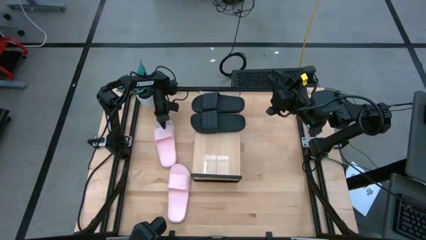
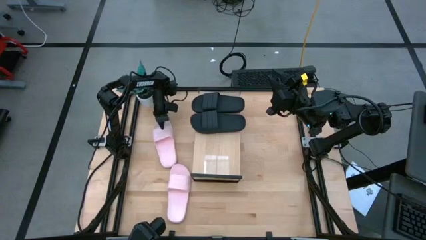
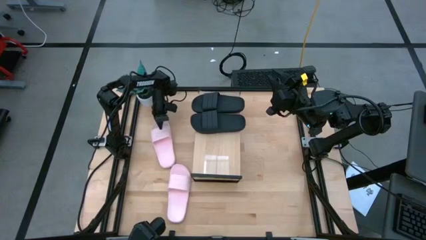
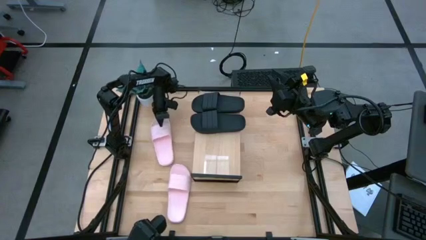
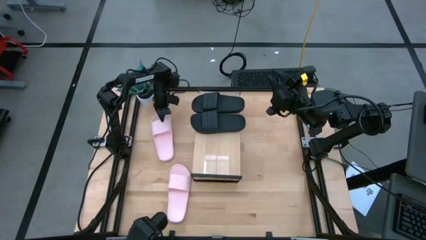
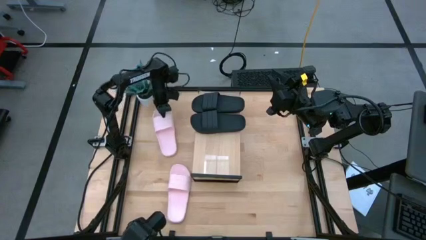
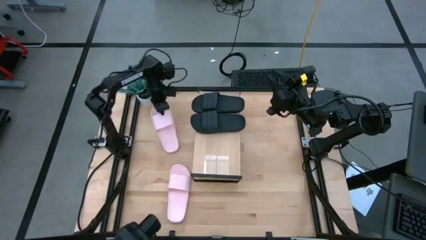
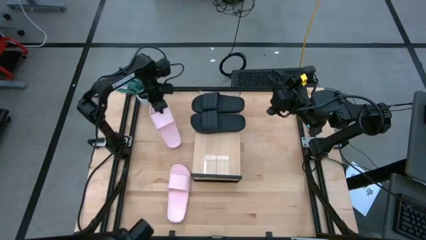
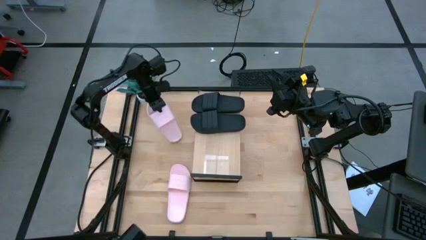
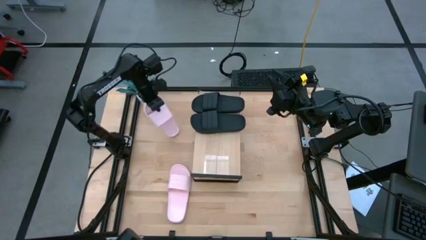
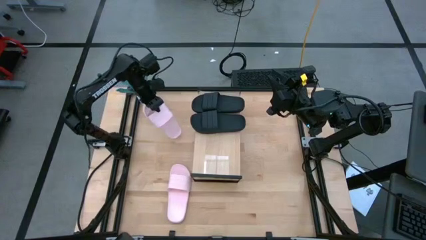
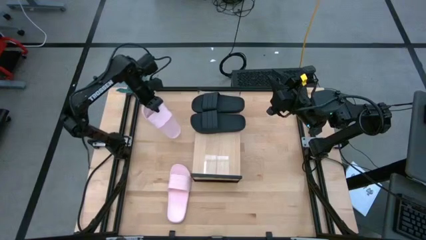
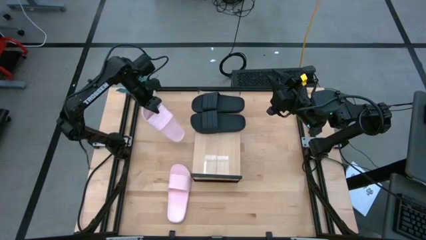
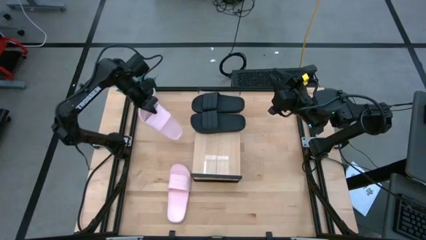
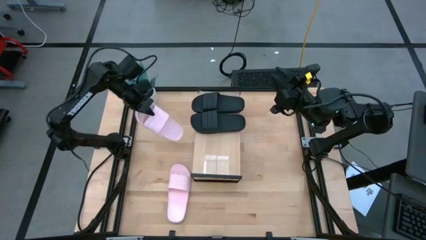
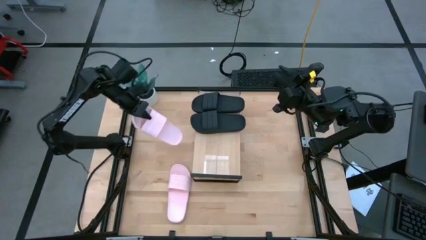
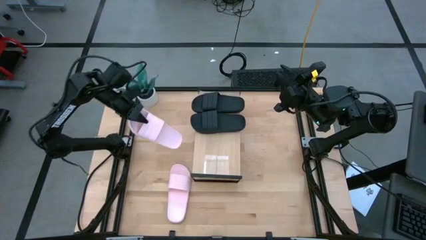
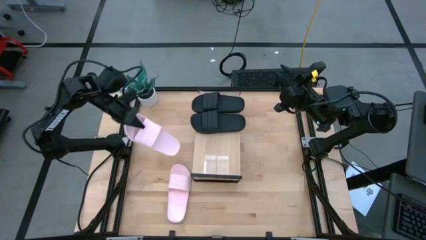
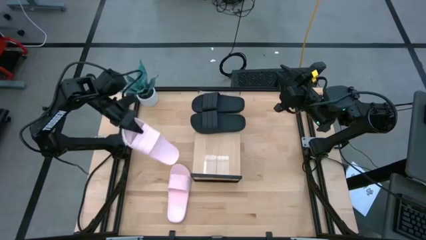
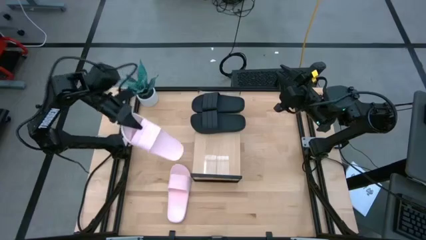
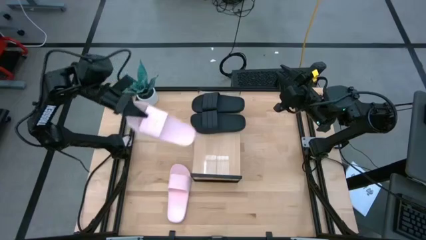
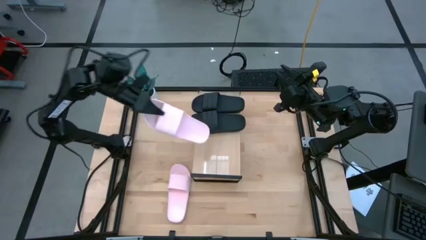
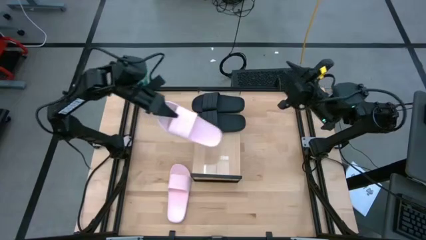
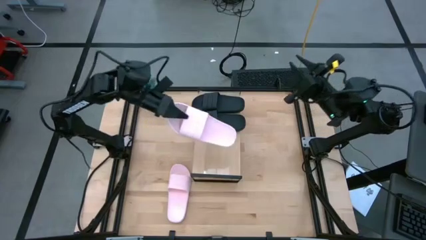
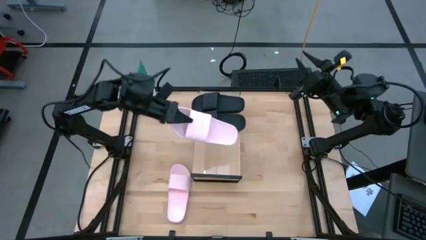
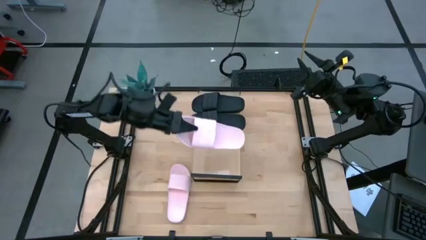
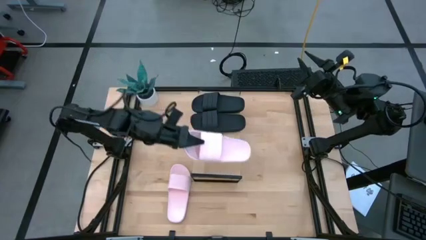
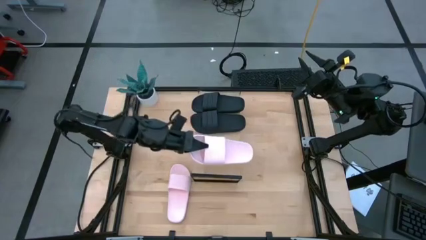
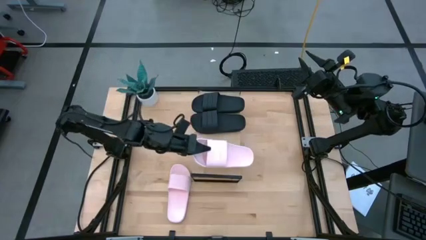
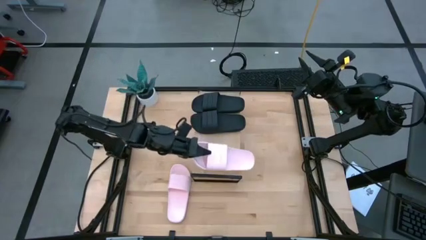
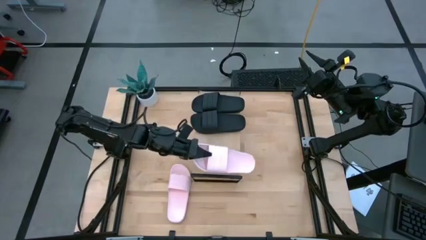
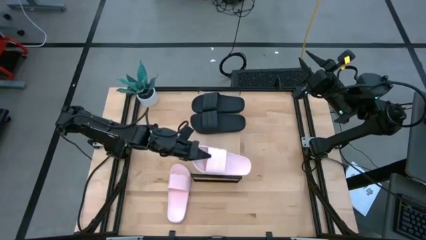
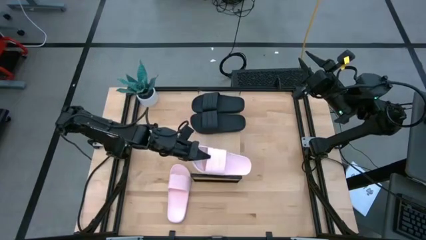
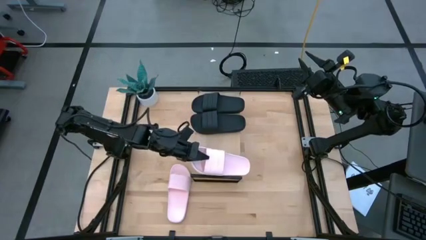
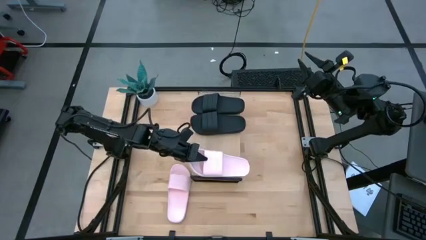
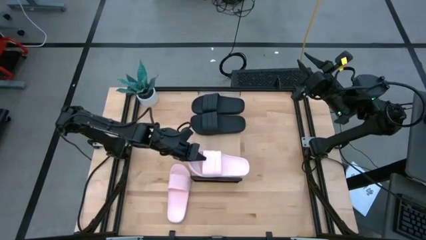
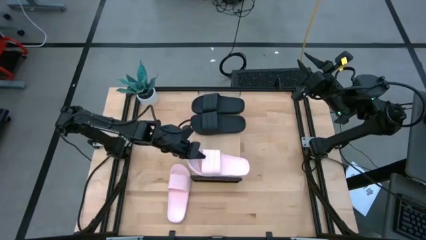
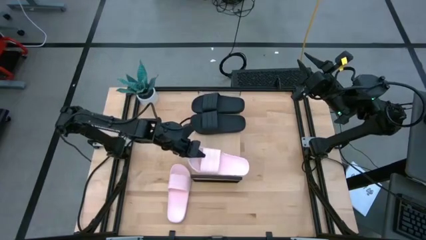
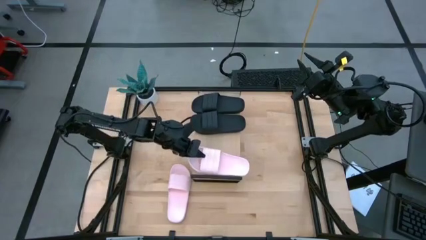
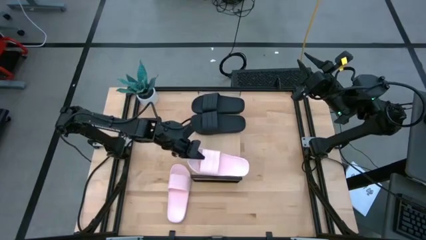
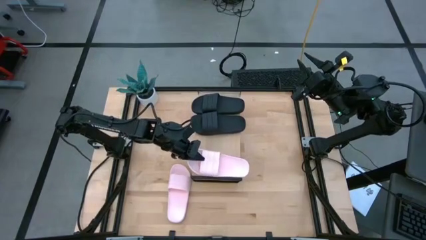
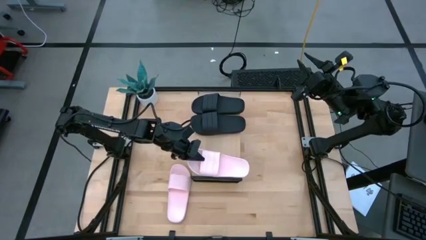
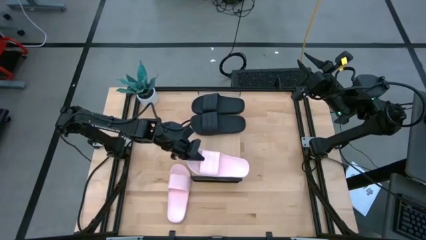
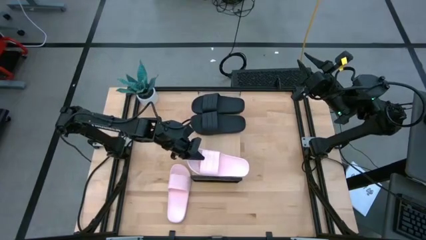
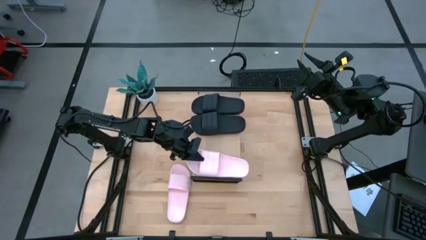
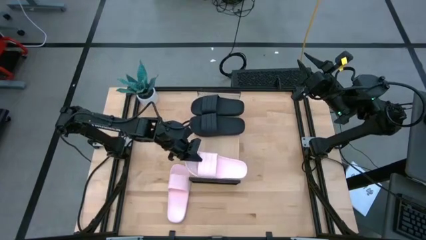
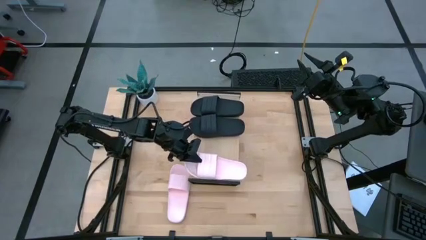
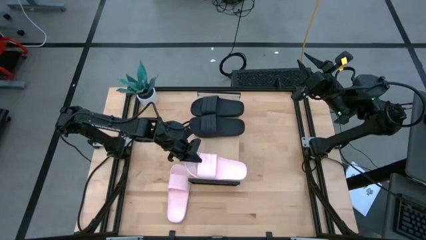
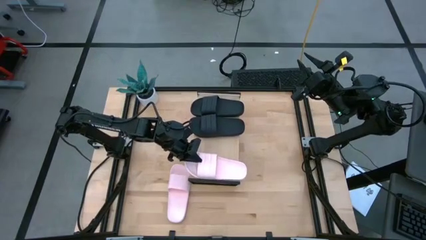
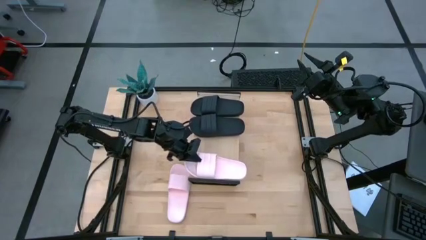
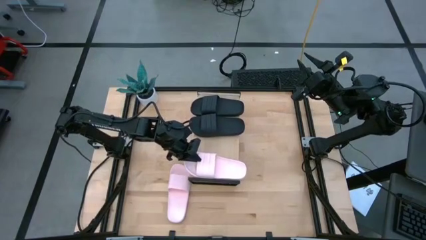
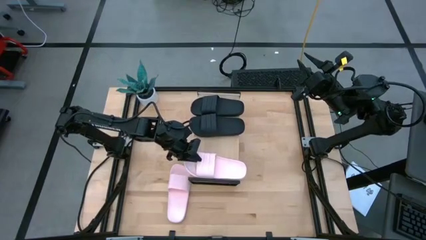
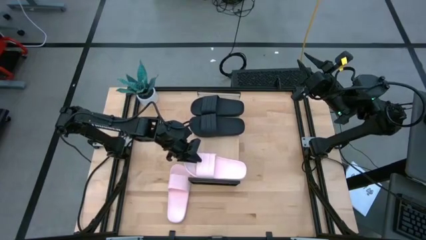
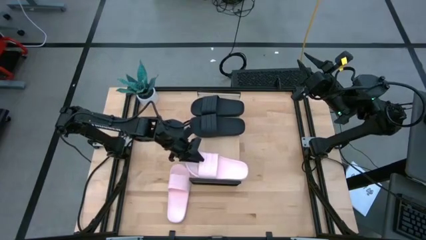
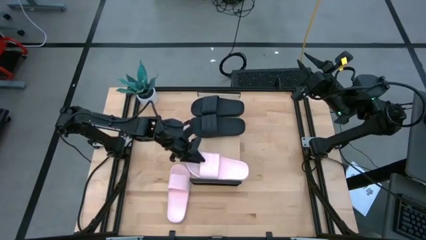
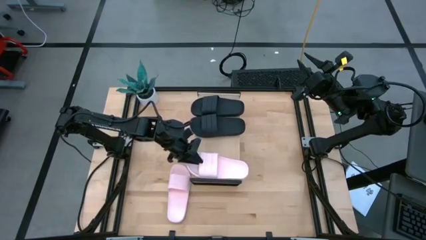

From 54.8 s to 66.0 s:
Task: Pick and place slides into the shelf
Put the top white slides on the shelf

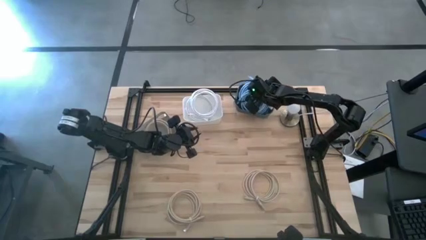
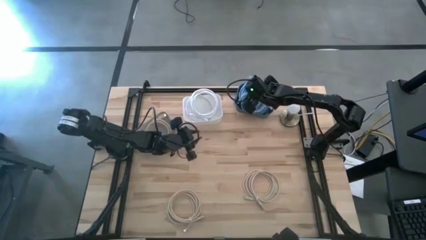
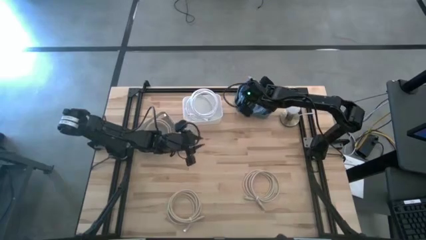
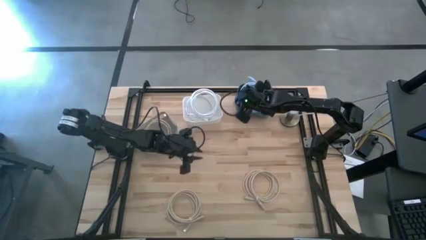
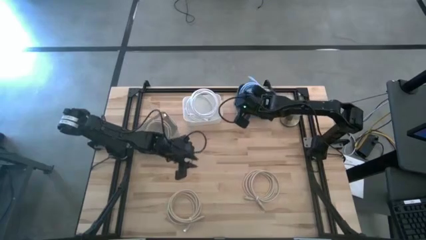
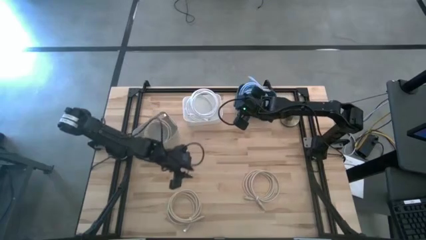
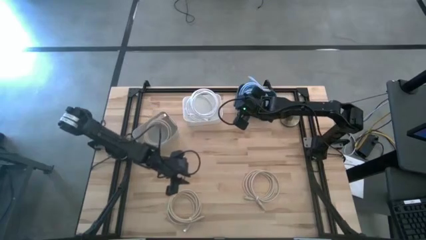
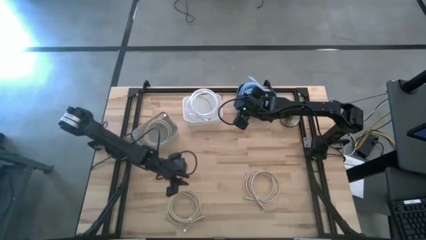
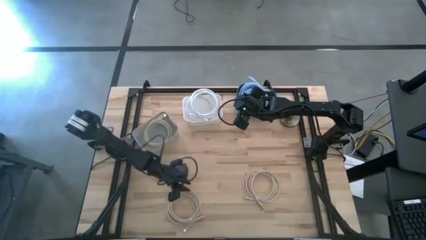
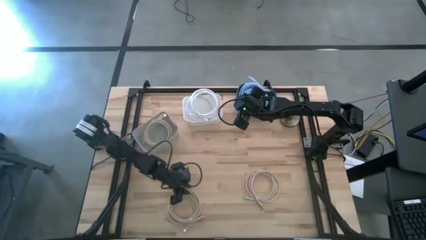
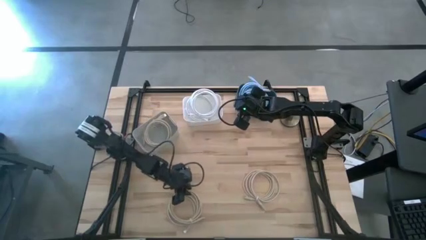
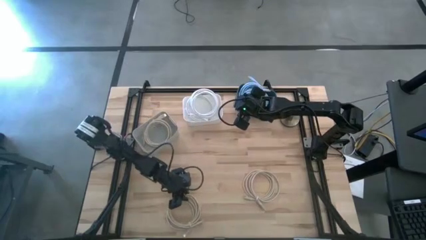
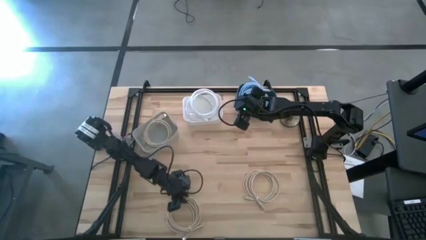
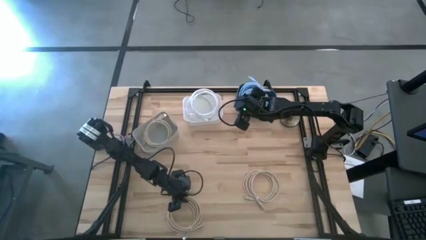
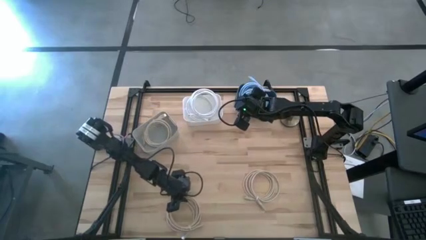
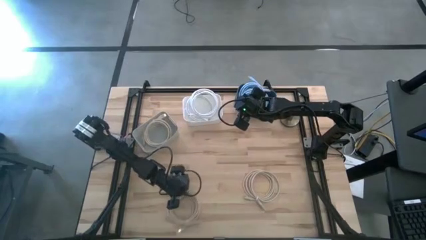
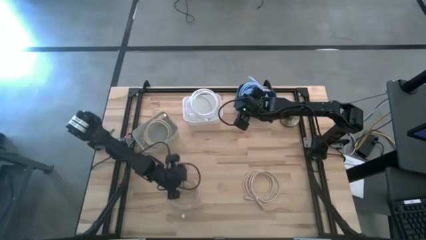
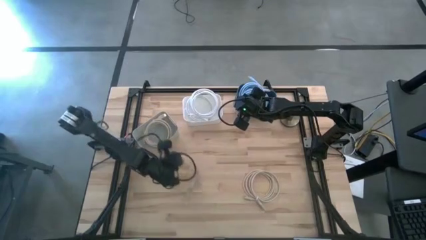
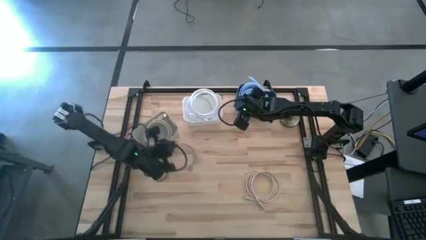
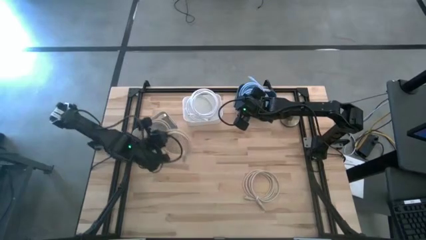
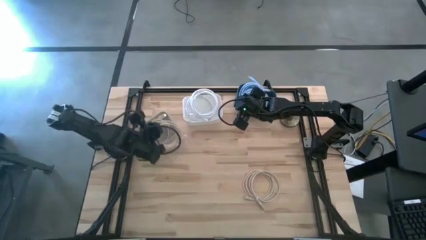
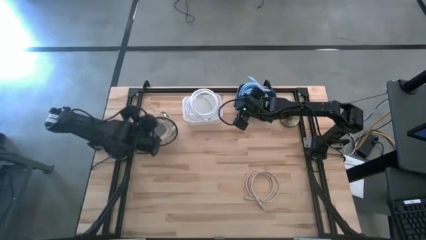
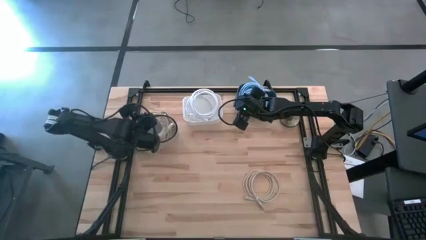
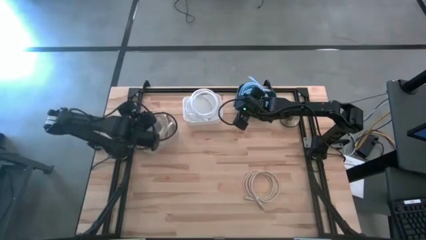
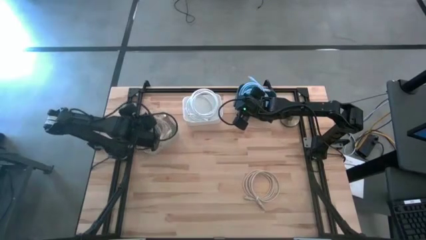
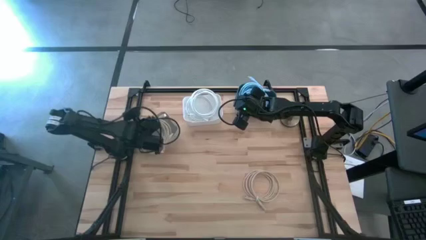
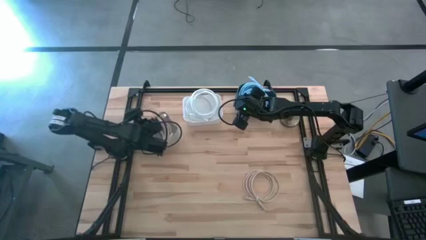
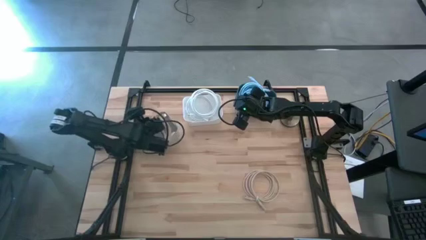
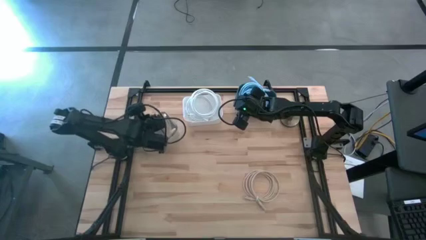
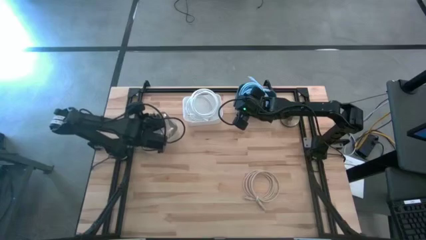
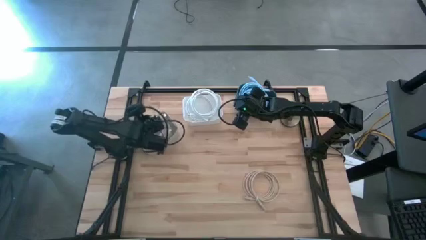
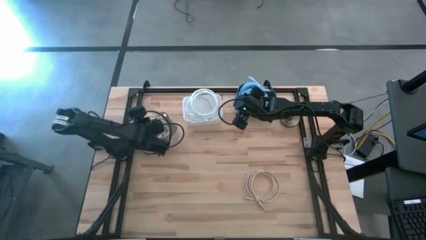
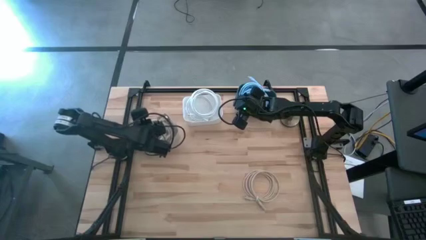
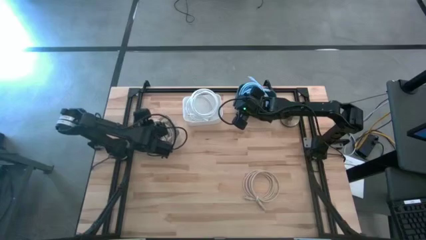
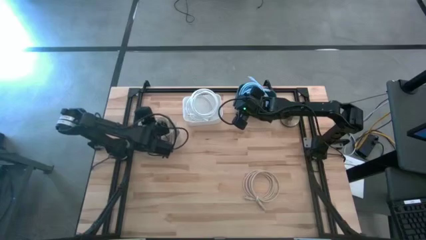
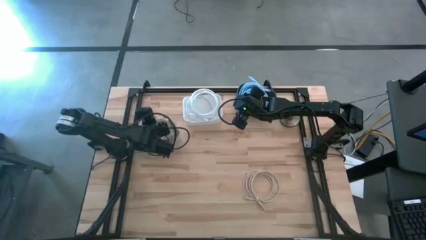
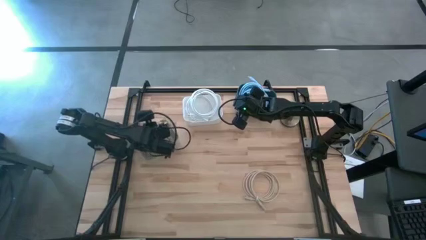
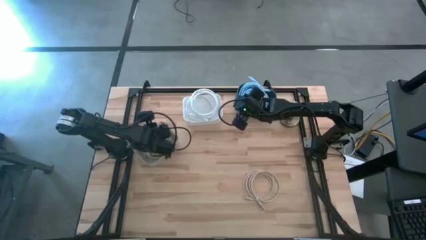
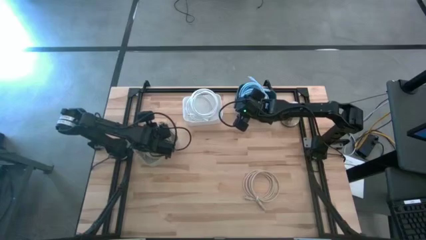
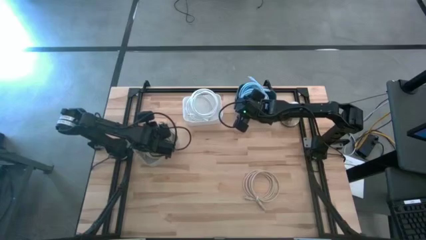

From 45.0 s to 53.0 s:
Task: Pick & Place USB Port
Put the left brown charger cable into the gray bin
